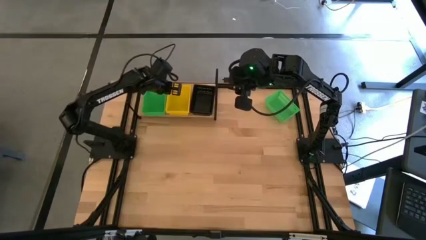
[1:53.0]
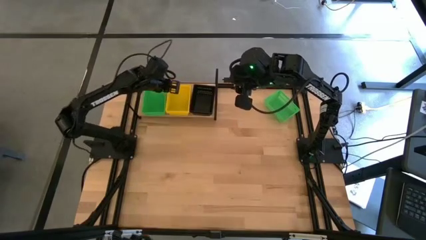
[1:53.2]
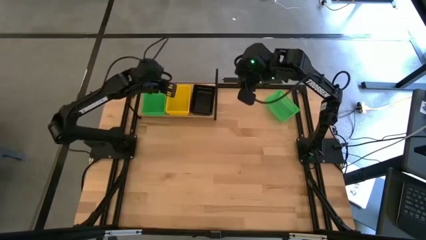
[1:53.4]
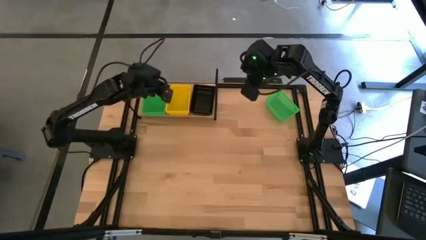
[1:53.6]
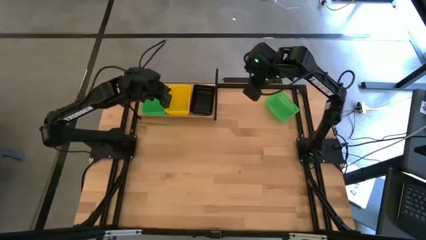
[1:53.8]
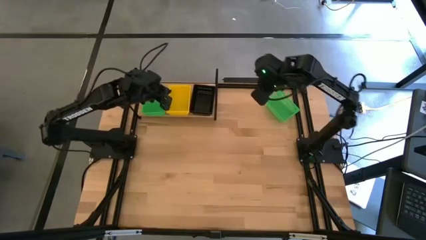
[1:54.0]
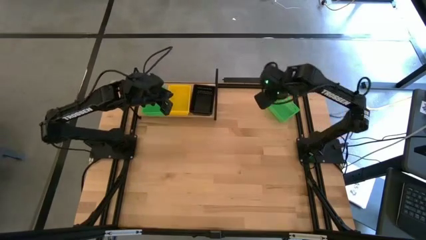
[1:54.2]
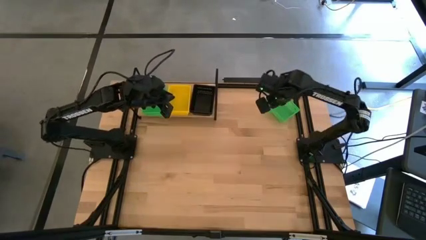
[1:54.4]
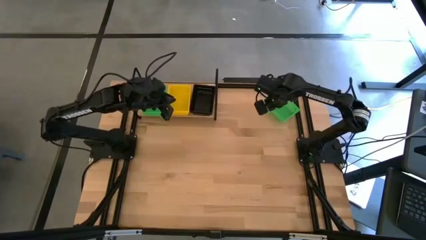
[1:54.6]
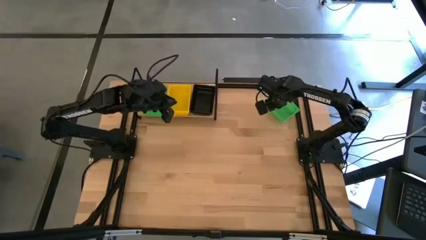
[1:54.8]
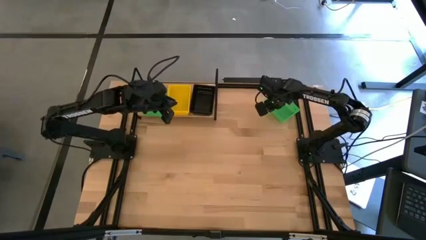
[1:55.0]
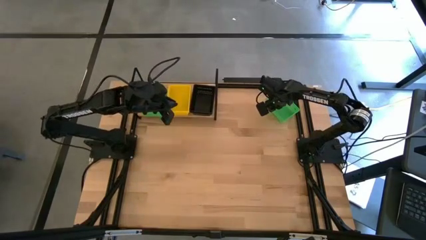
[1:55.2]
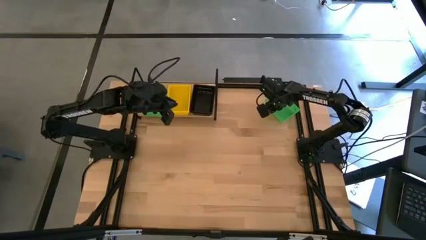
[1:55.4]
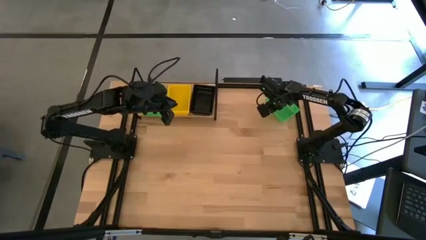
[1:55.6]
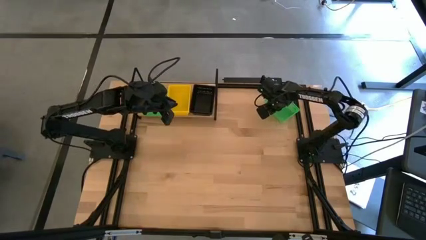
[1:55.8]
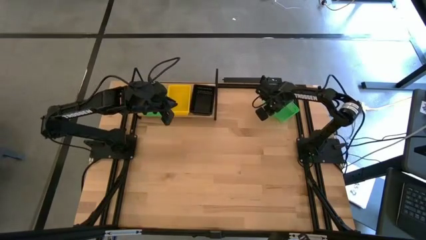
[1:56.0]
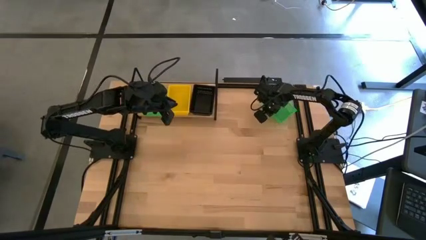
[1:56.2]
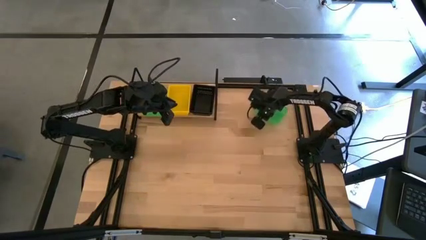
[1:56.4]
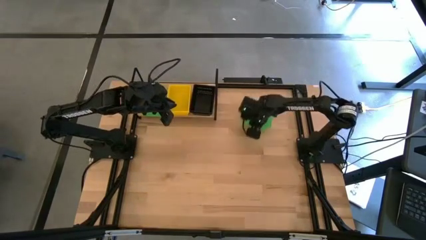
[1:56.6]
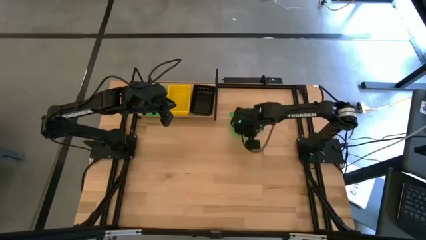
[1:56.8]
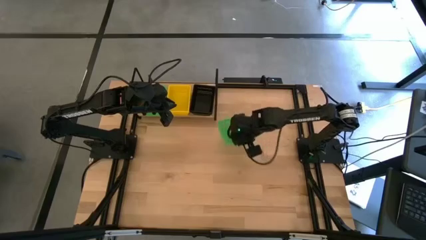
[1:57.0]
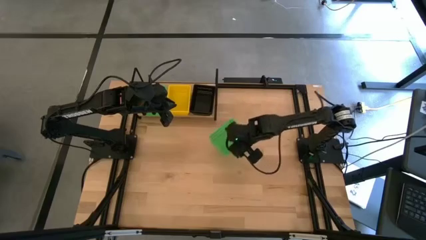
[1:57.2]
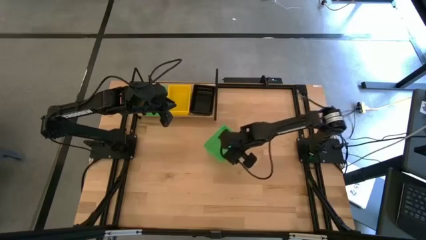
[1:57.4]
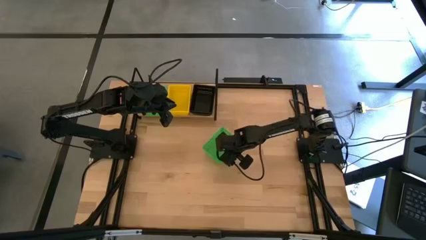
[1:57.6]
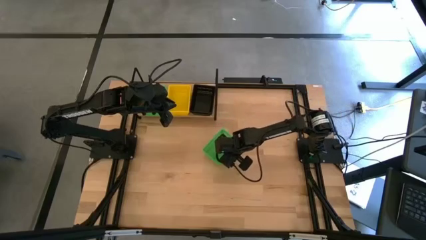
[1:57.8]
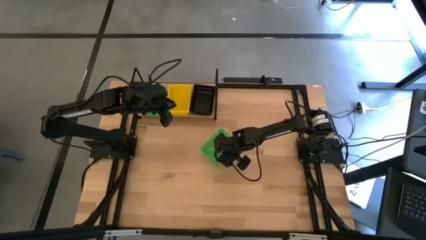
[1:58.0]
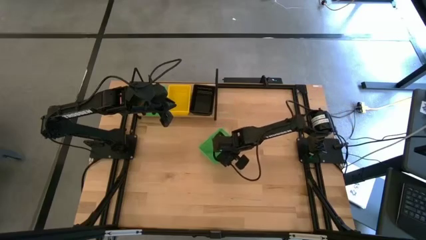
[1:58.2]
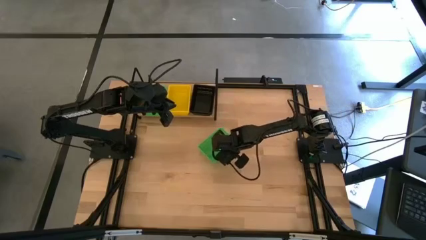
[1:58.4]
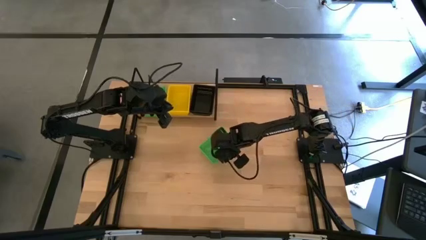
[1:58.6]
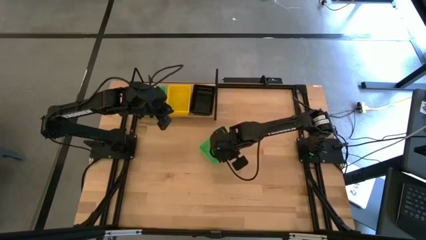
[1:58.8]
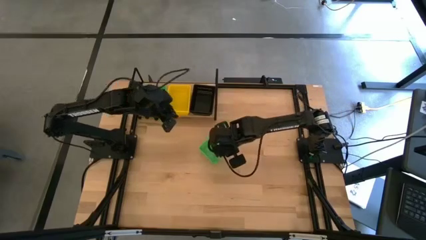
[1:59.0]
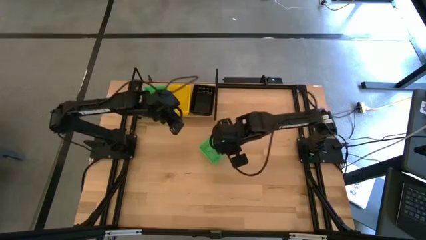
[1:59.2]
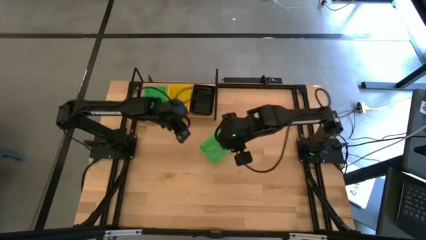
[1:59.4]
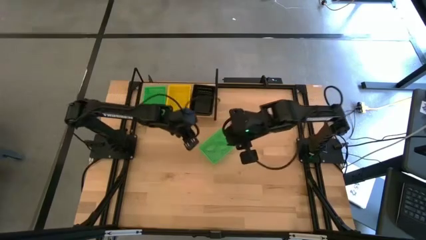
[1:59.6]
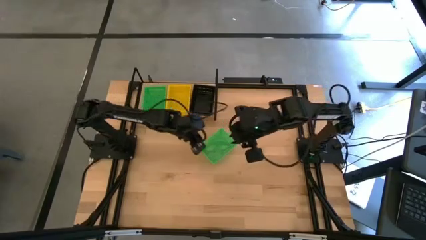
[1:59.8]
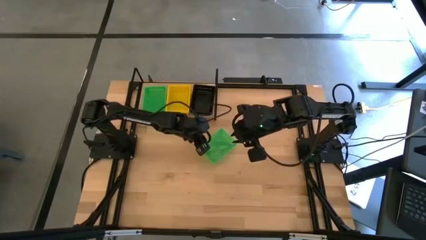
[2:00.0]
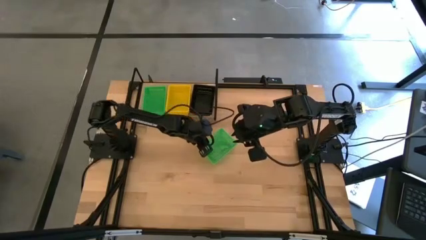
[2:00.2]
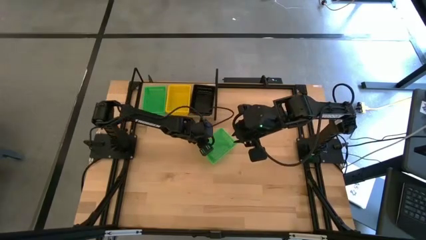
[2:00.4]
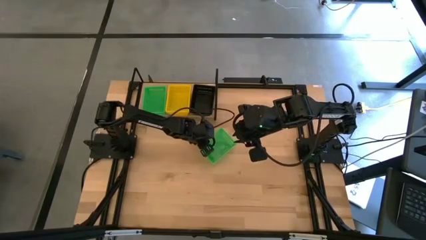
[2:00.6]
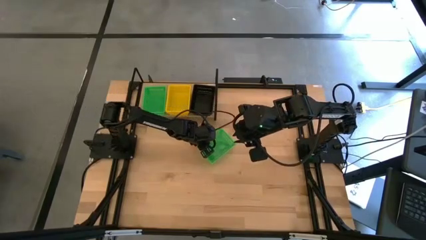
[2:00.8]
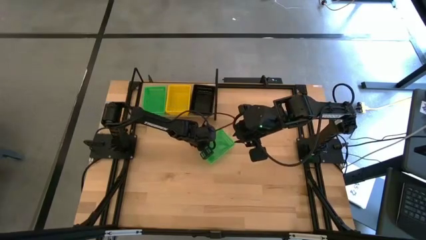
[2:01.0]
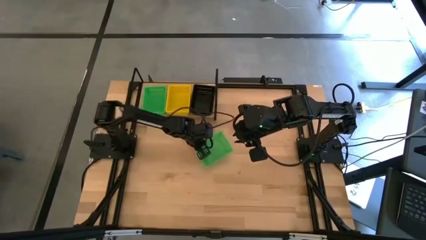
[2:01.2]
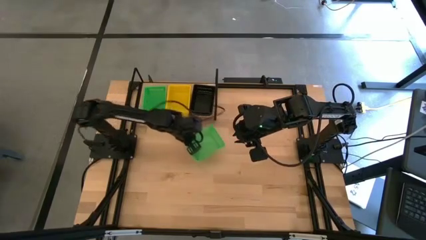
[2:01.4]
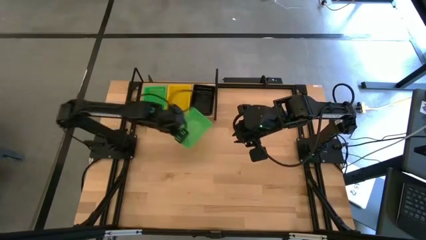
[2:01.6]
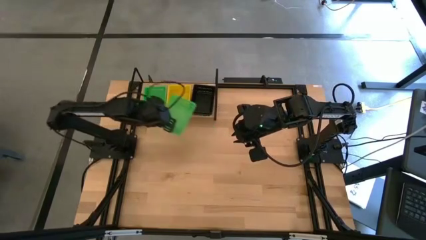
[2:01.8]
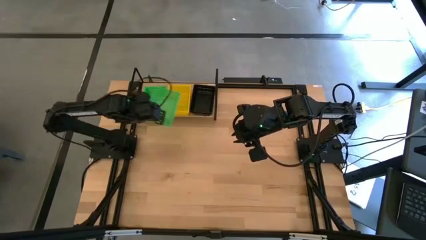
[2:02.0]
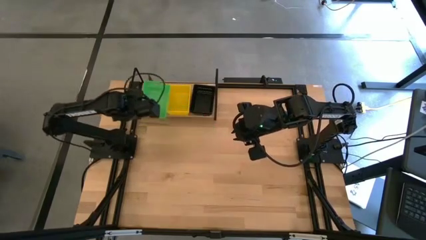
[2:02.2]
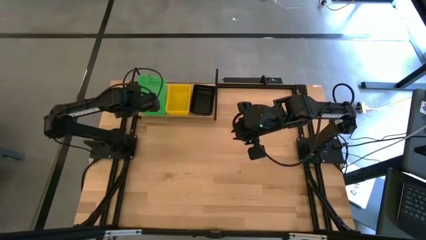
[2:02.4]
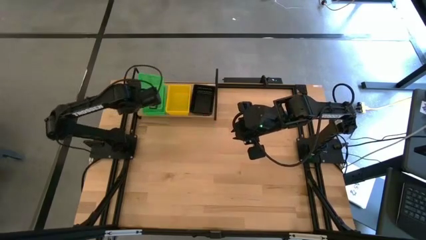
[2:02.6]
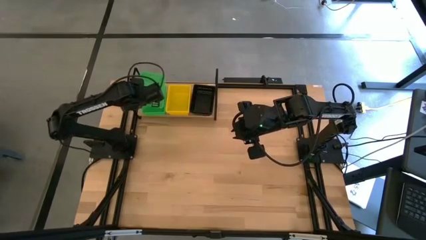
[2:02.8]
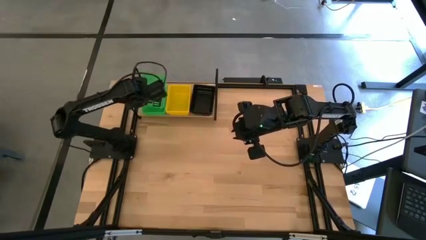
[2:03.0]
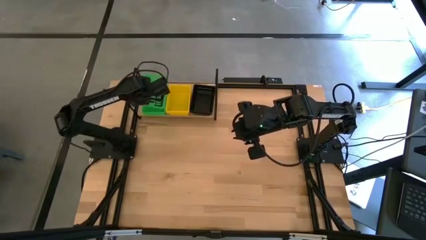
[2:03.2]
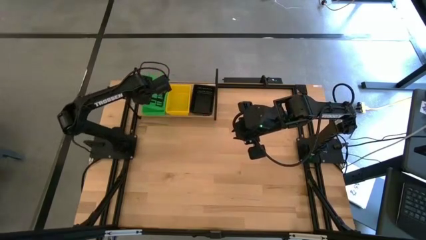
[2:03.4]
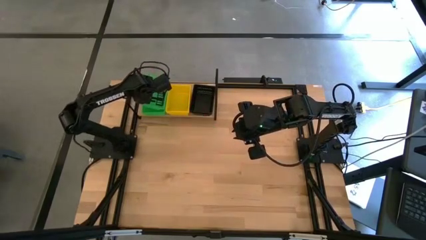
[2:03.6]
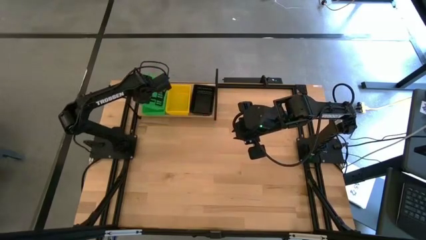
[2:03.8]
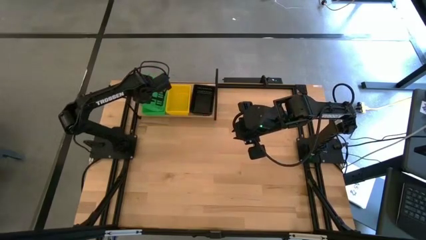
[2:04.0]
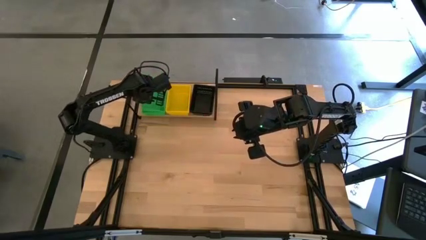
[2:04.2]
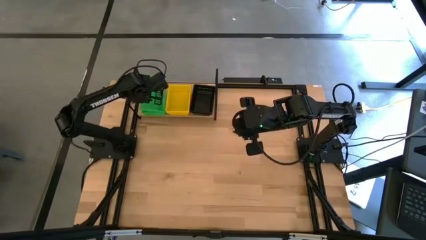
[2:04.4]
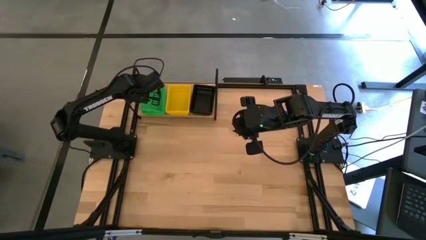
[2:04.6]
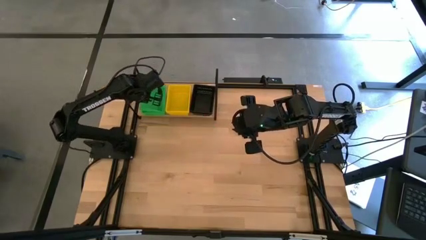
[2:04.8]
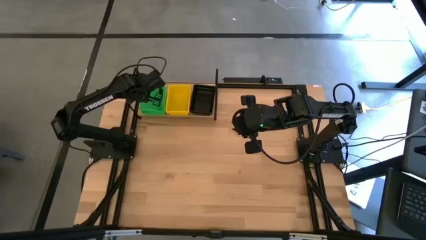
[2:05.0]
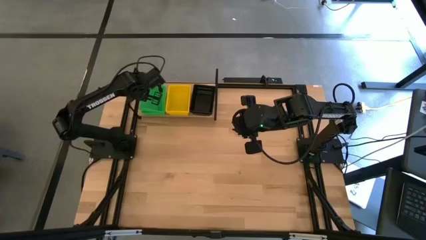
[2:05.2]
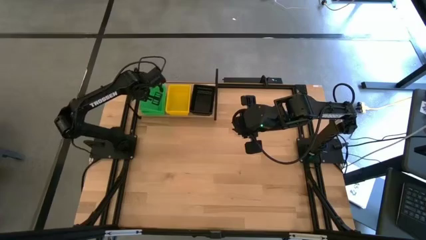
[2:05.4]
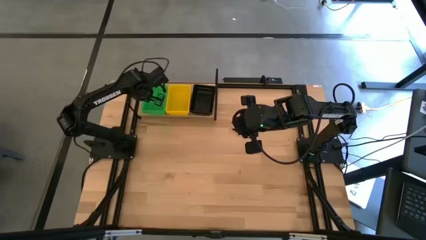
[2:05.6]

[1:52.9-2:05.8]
Task: Stack baskets on shelf by color
Stack the green basket on the green basket on the shelf
